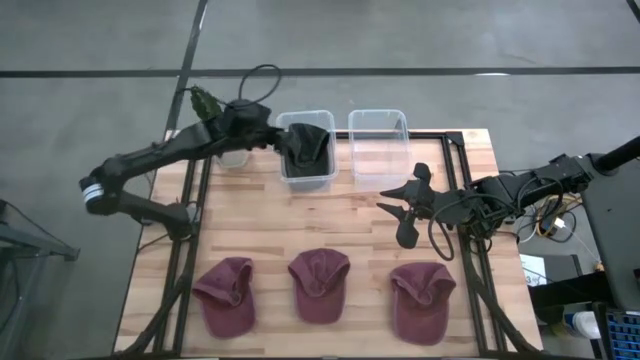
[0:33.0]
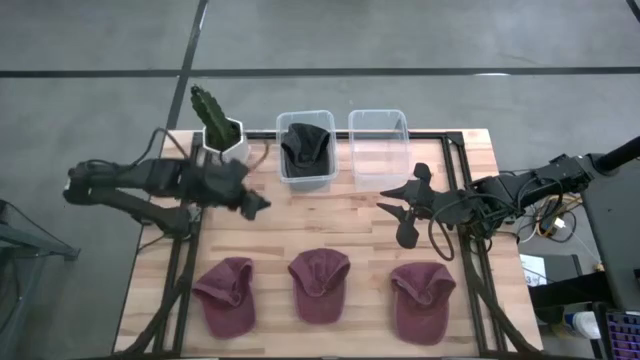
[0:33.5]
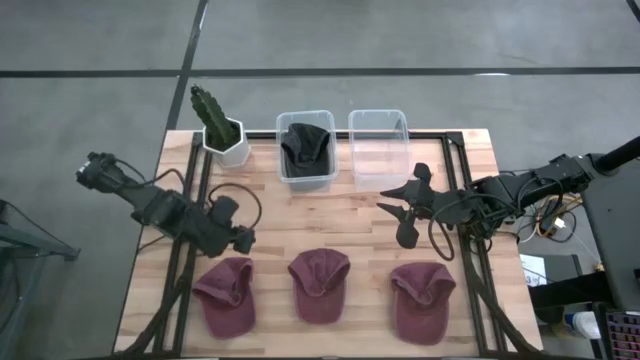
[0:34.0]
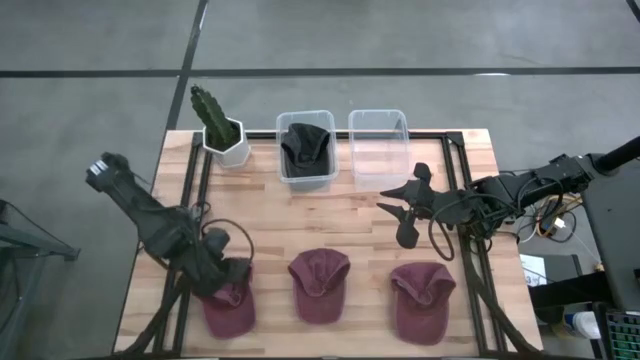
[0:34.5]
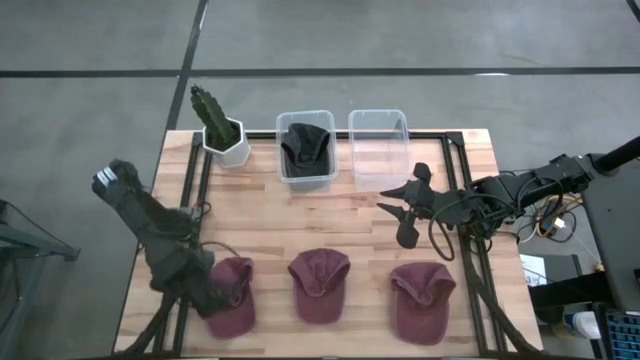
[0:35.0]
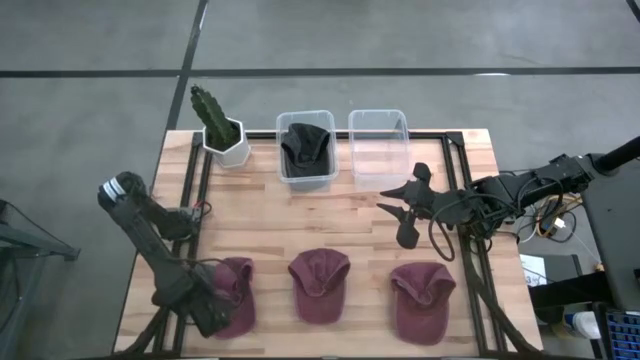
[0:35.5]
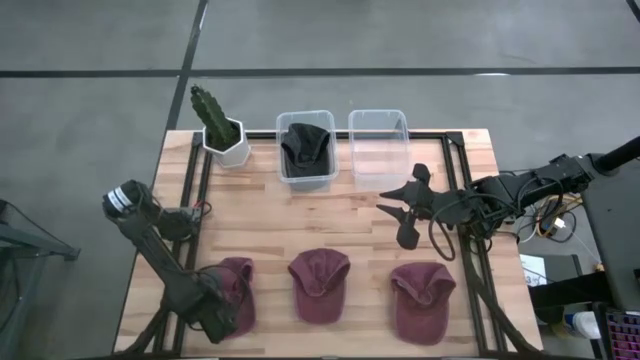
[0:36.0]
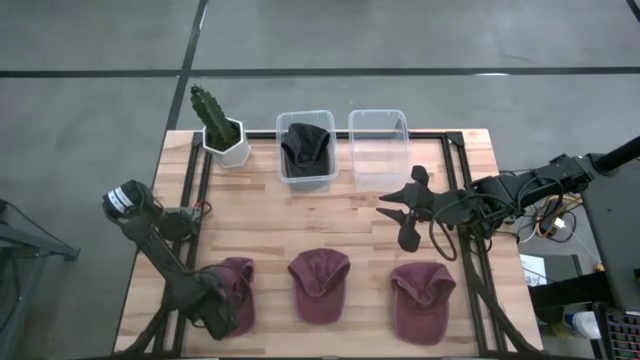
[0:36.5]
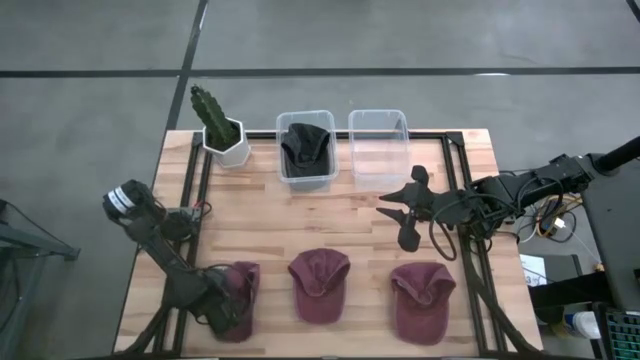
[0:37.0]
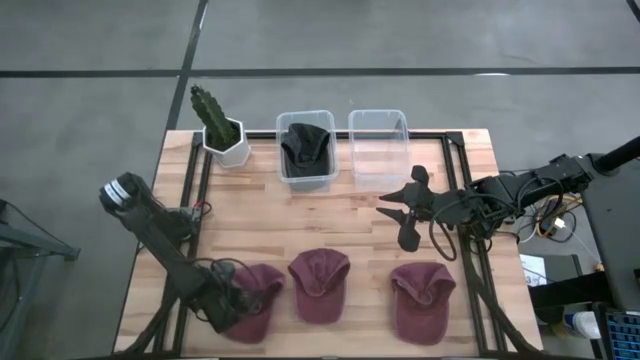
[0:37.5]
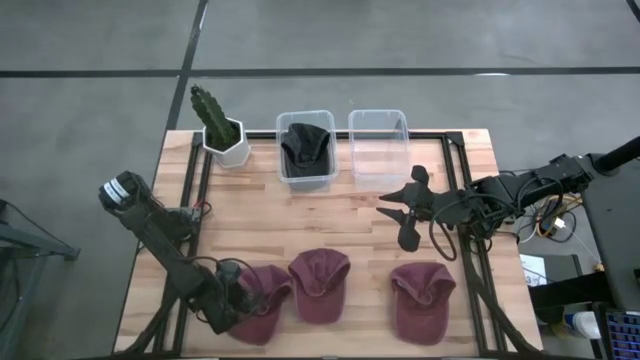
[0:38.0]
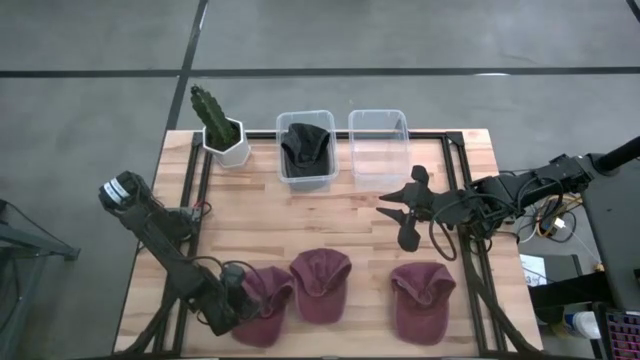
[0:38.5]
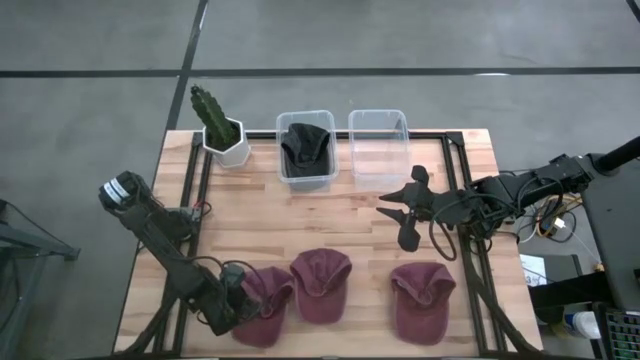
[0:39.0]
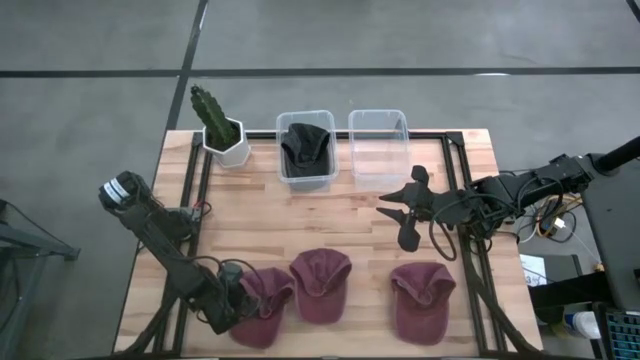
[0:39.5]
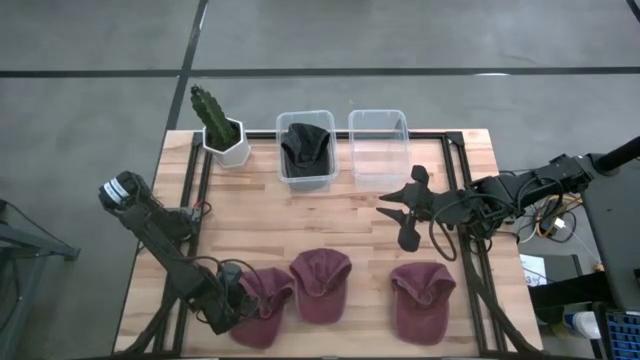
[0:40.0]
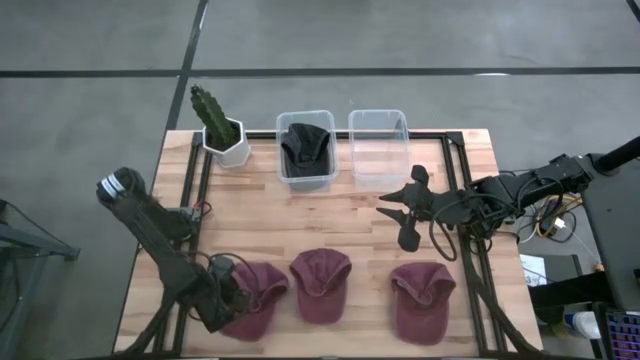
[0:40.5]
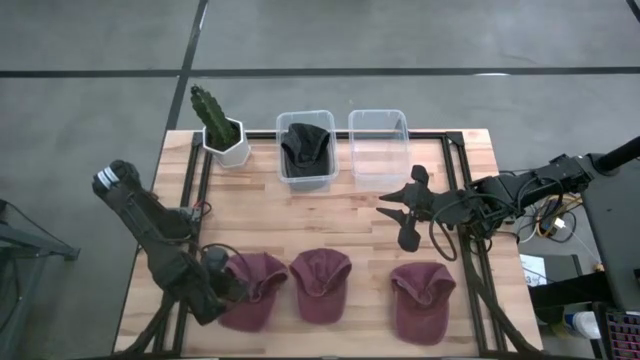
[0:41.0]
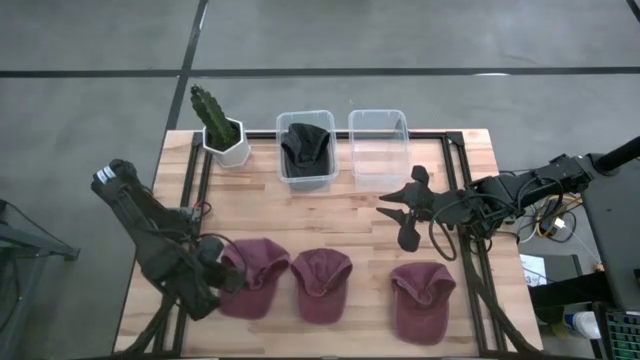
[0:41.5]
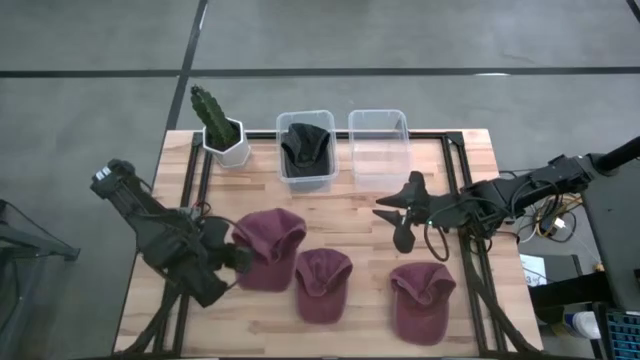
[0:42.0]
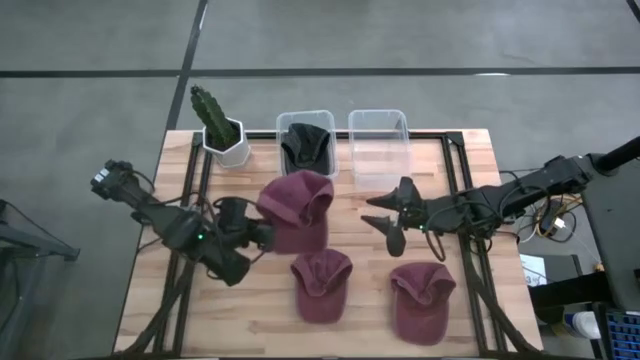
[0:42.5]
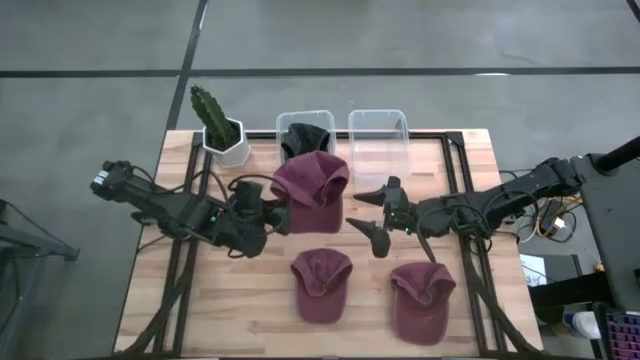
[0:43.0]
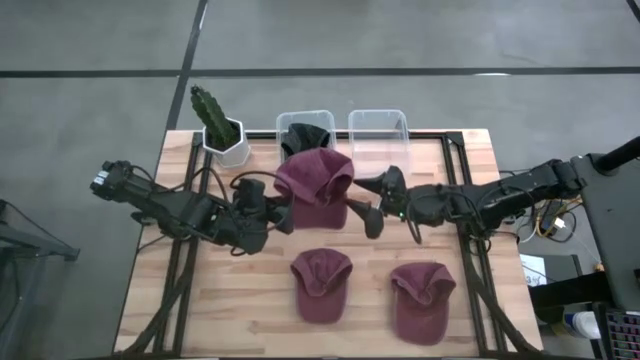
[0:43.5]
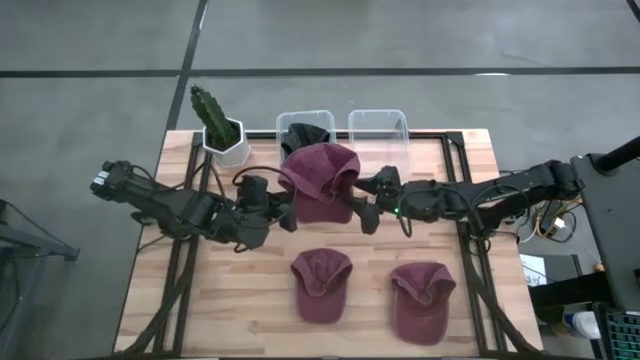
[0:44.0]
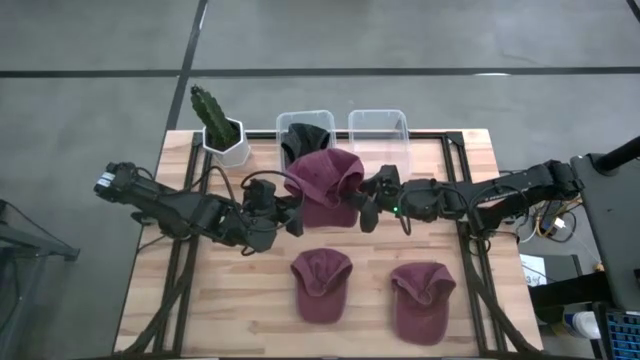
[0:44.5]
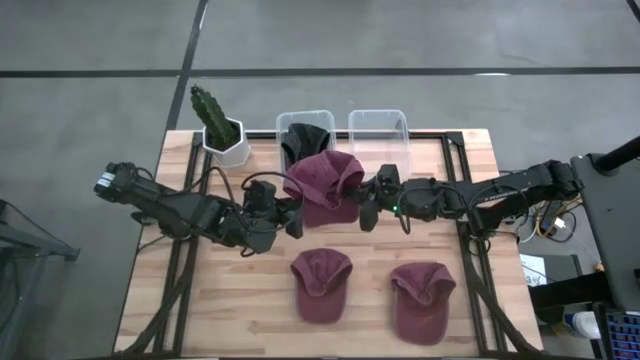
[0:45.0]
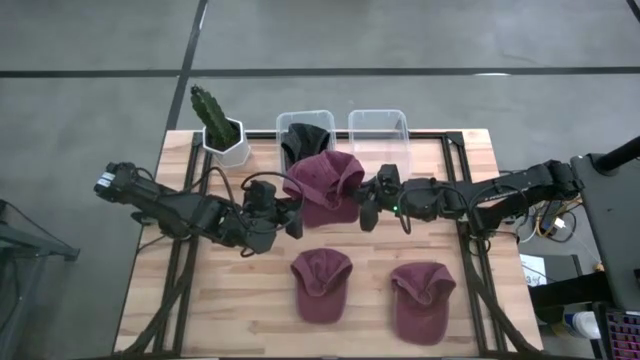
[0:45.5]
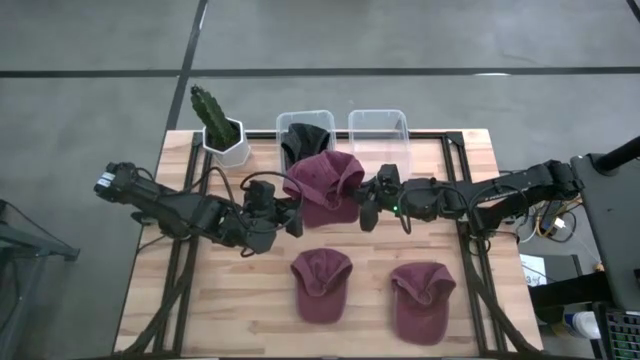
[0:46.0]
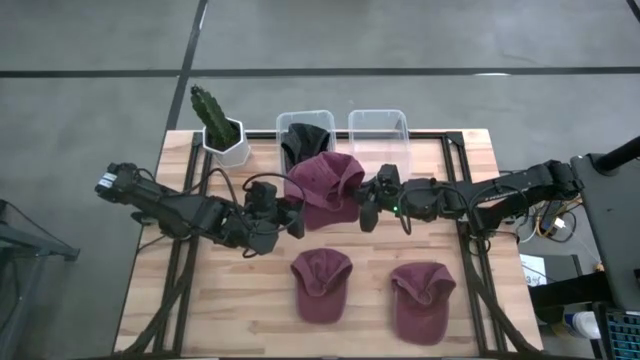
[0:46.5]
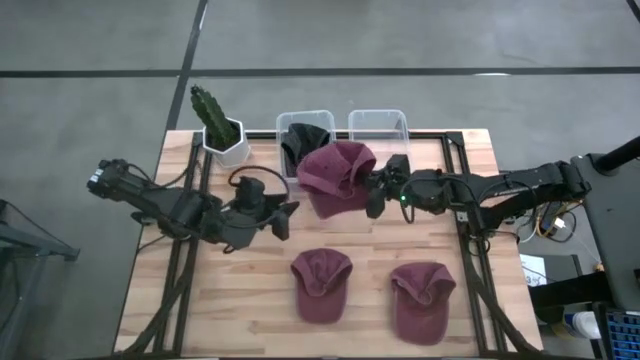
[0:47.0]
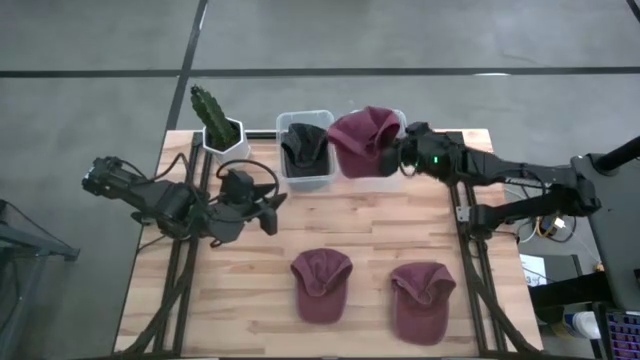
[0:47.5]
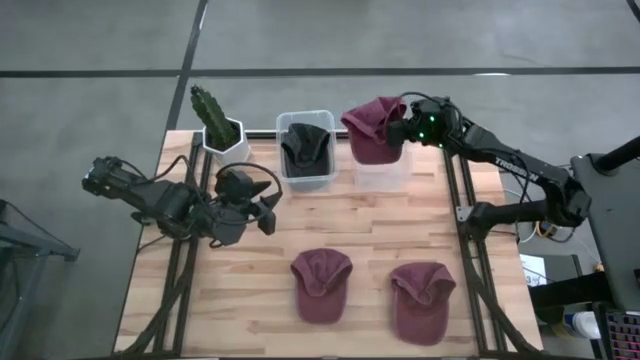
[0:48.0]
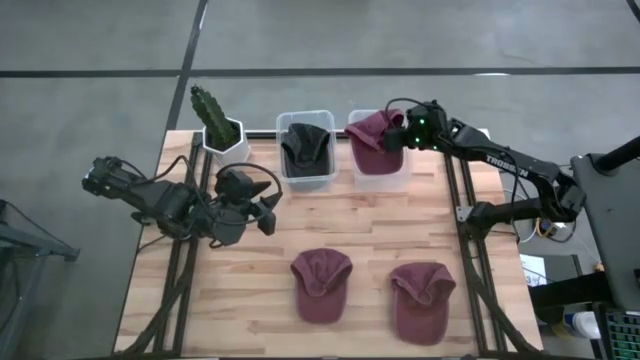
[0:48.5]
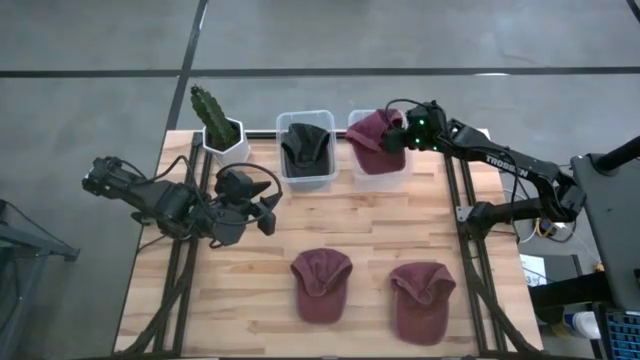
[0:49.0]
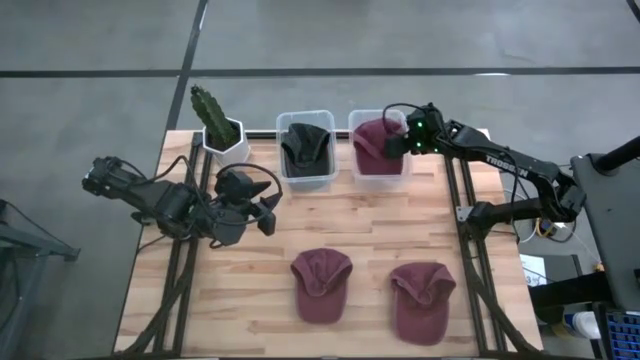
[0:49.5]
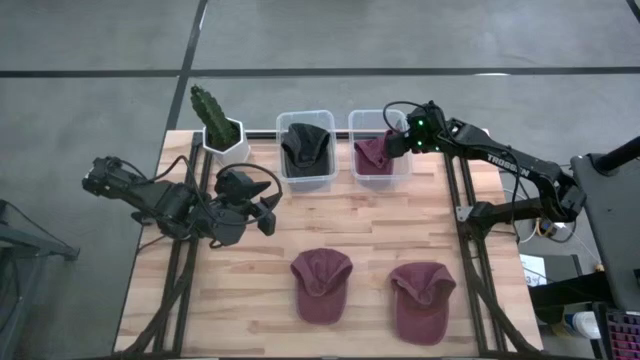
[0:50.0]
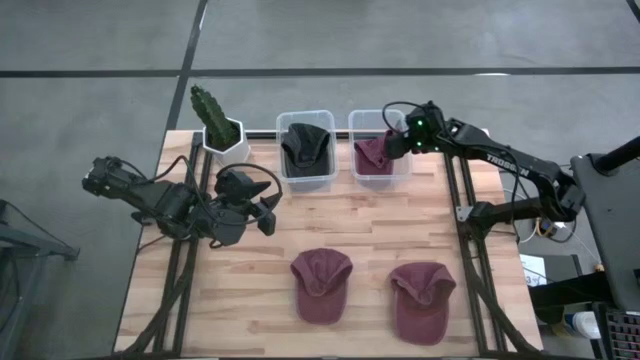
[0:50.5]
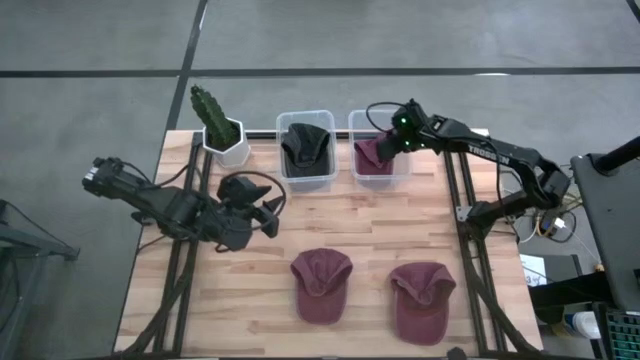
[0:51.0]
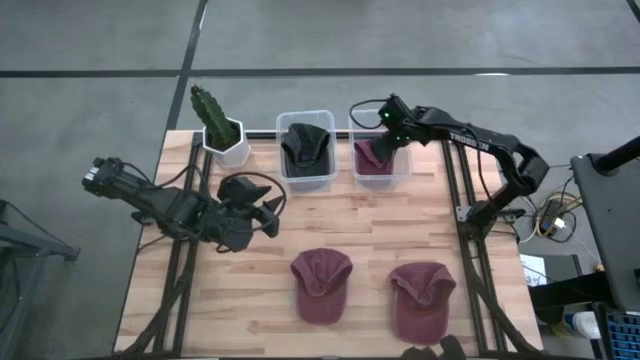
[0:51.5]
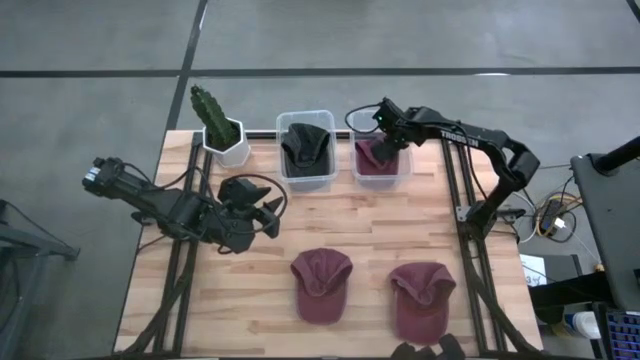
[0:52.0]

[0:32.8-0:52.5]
Task: Pick & Place hat
Put the left red cap into the right transparent bin

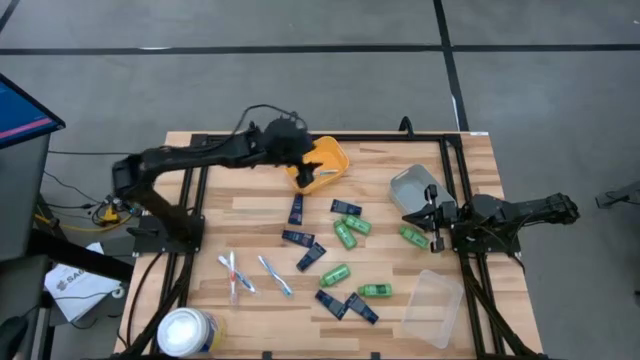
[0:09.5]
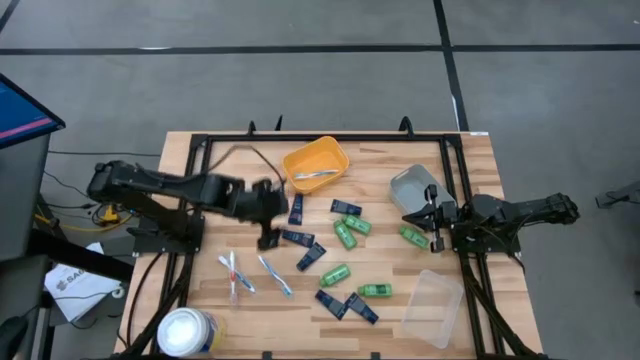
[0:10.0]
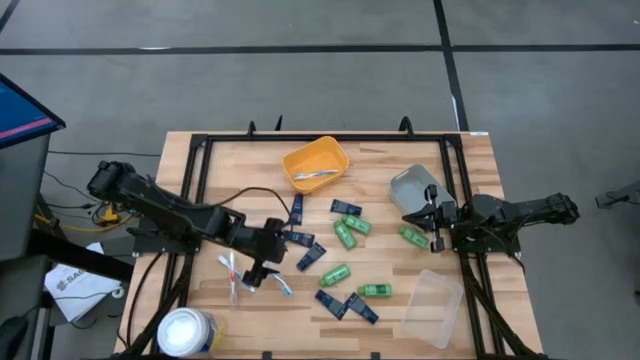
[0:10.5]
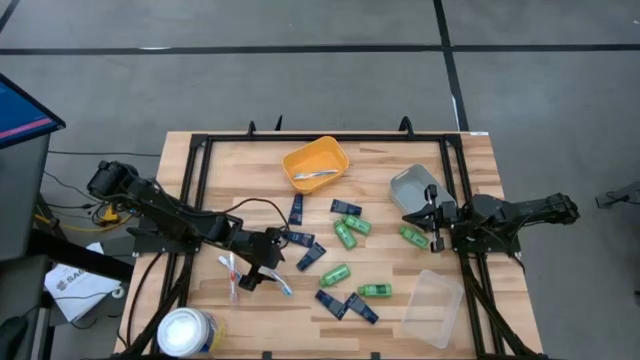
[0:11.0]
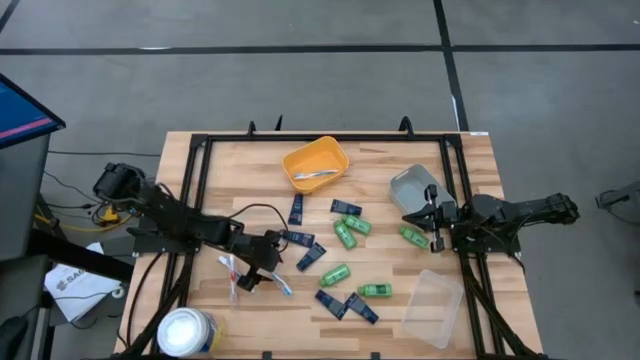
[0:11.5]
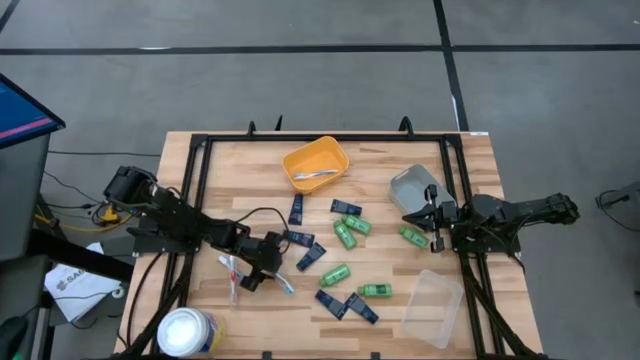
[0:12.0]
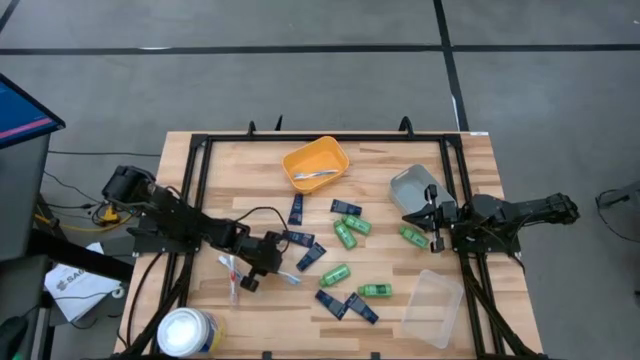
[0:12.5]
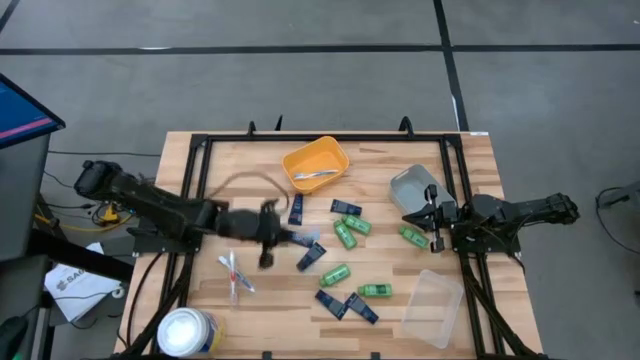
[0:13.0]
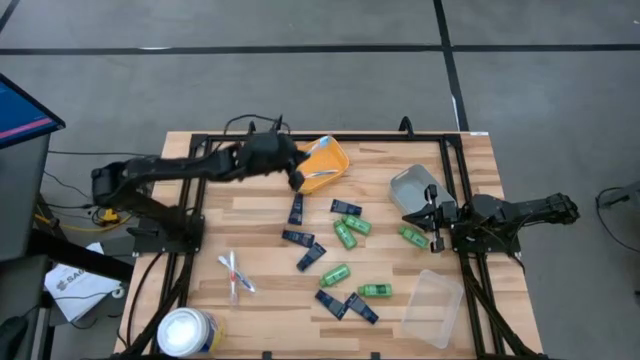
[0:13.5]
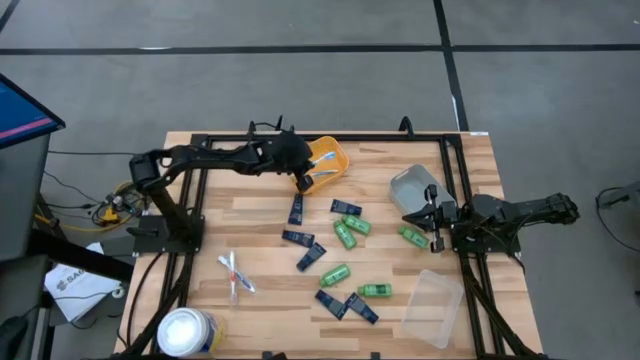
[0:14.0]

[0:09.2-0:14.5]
Task: Pick & Place Travel size toiletries
Put the blue toothbrush into the yellow bin
